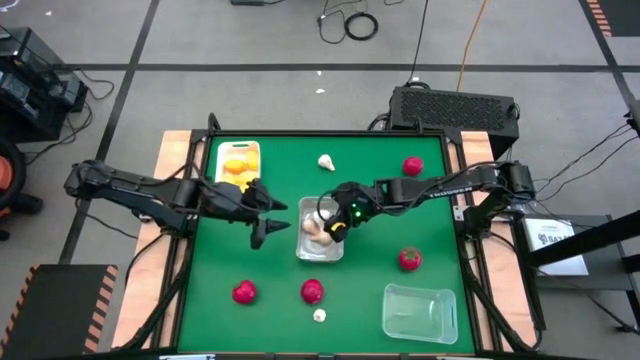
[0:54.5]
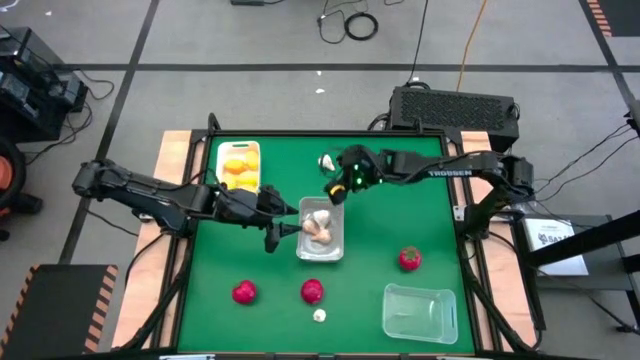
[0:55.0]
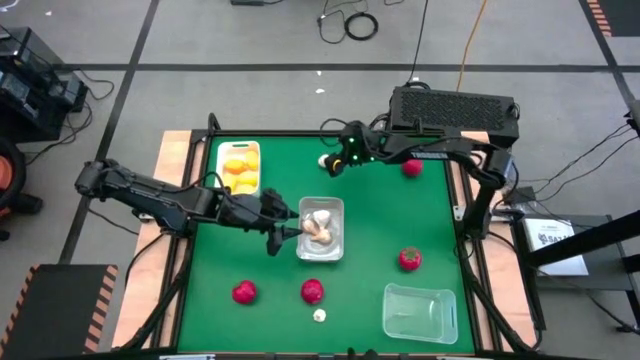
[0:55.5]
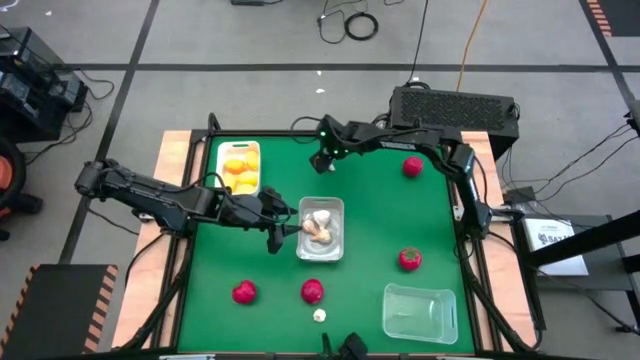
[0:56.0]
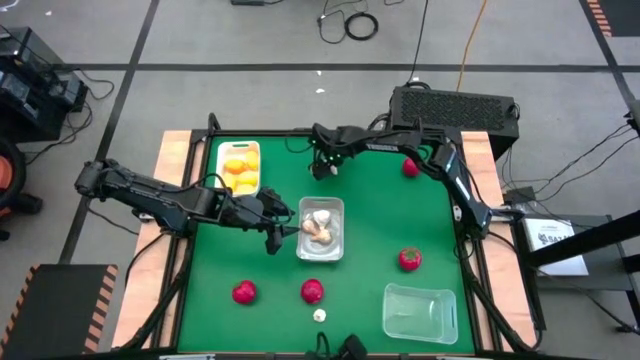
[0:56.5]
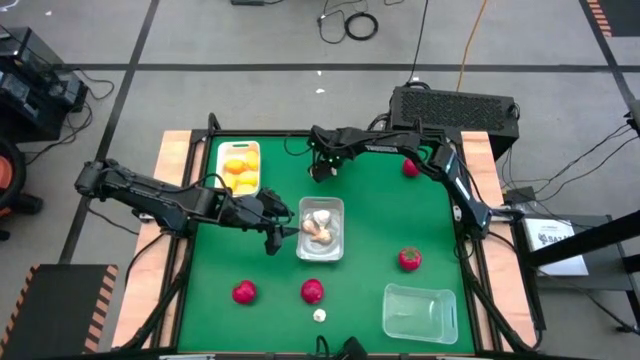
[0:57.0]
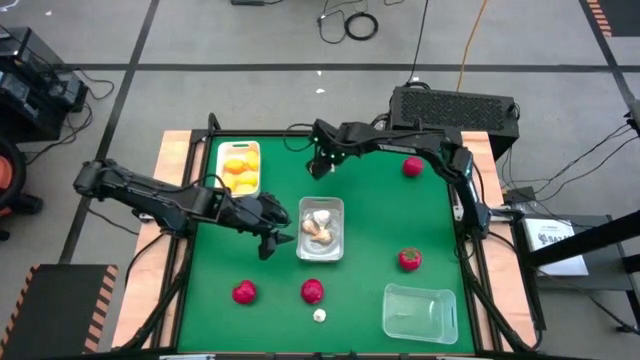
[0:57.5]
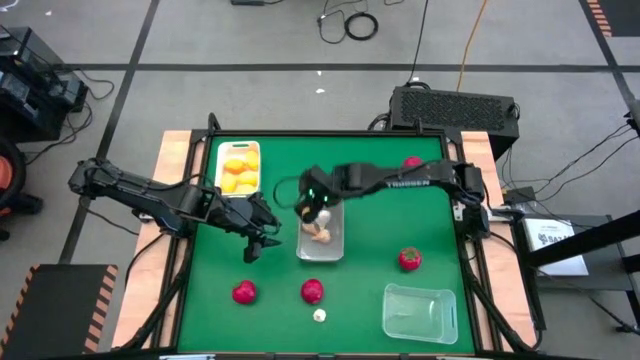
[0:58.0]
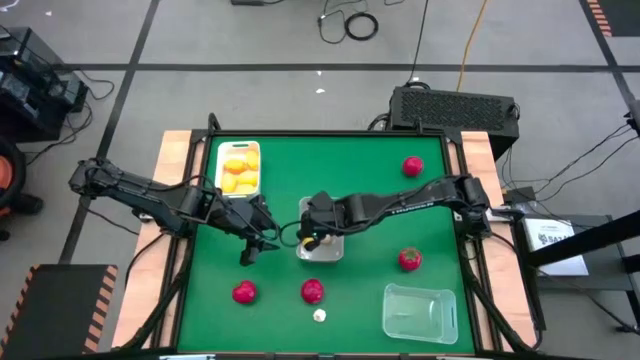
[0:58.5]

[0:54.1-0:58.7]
Task: Sort produce into baskets
Put the garlic into the gray bin

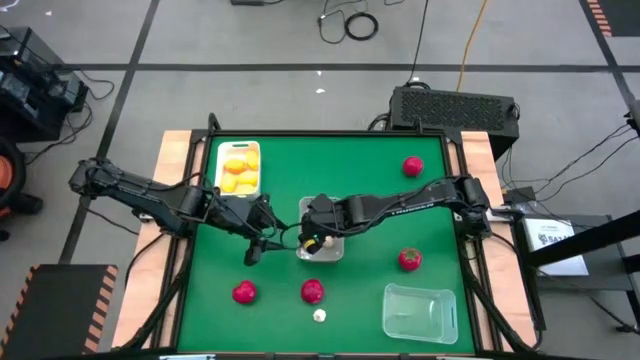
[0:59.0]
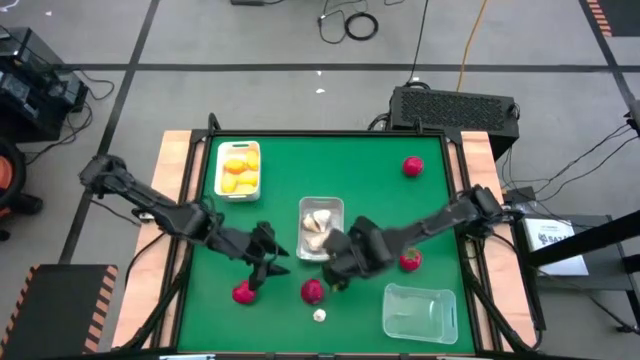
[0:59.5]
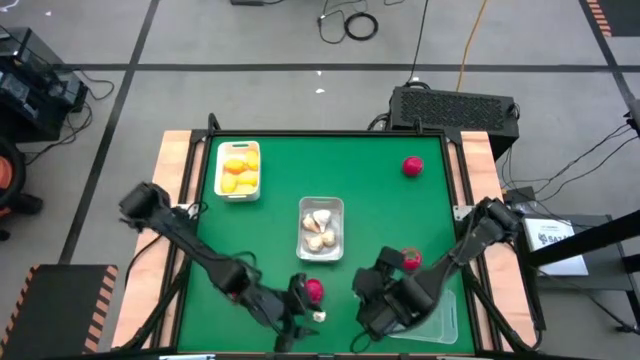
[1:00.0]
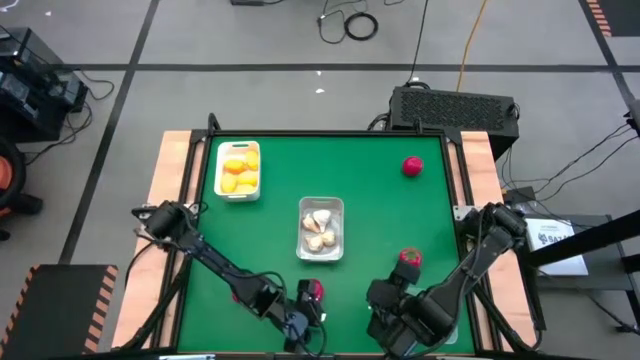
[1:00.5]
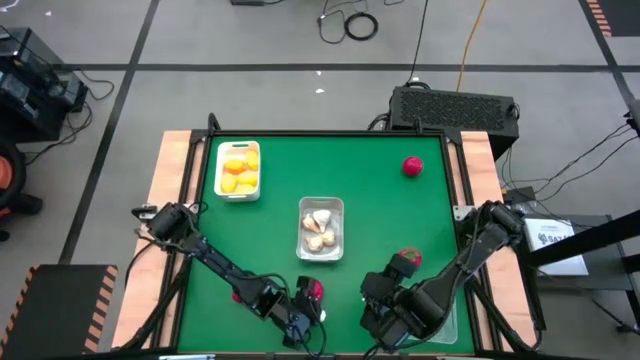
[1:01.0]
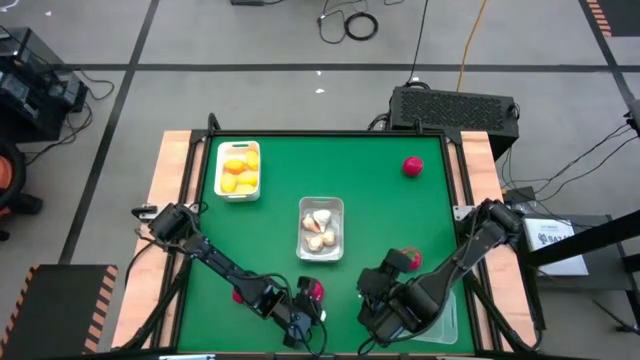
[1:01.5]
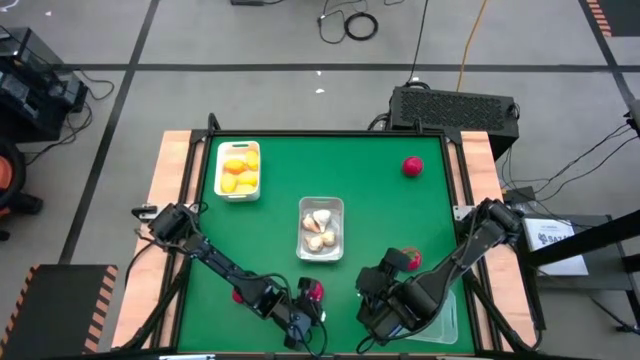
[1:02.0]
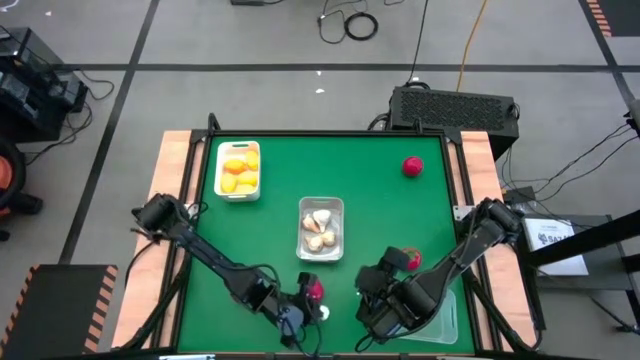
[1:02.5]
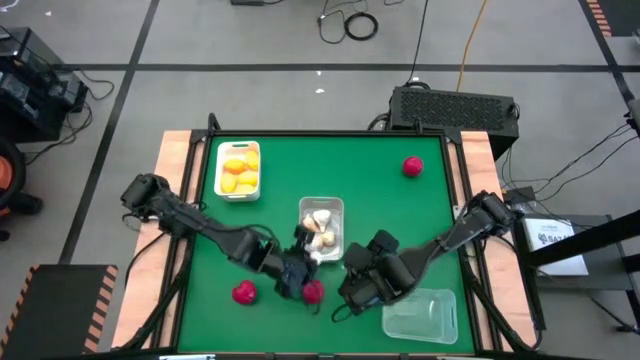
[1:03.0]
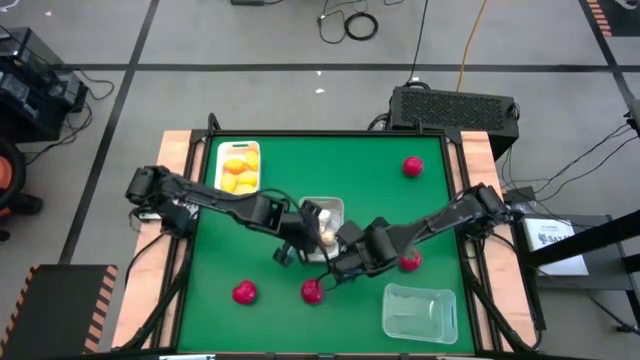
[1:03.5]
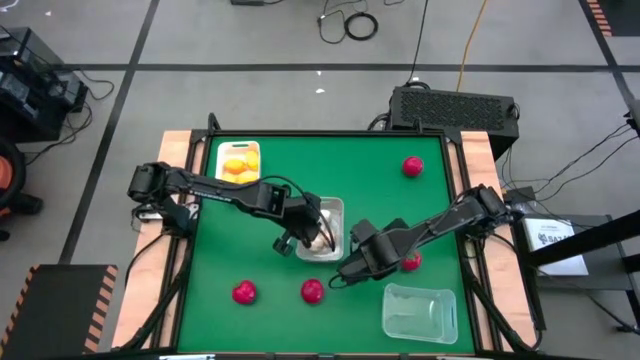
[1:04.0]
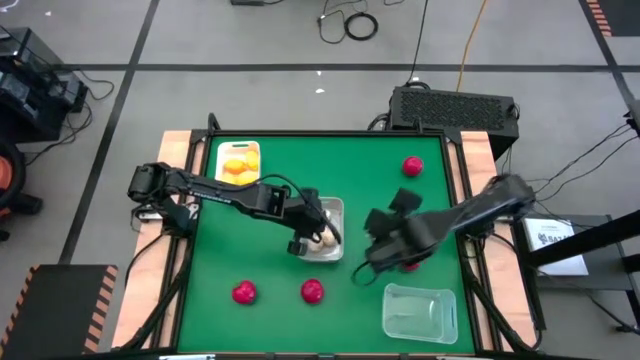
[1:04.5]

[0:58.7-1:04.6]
Put the garlic into the gray bin

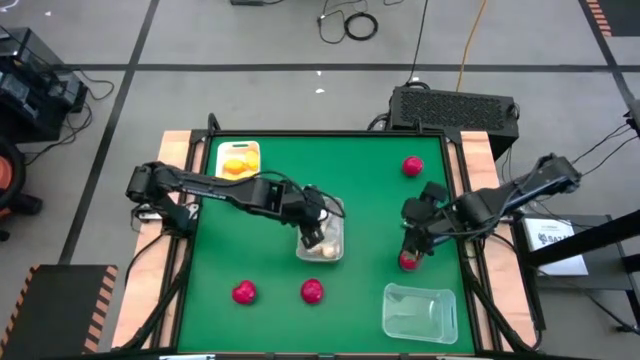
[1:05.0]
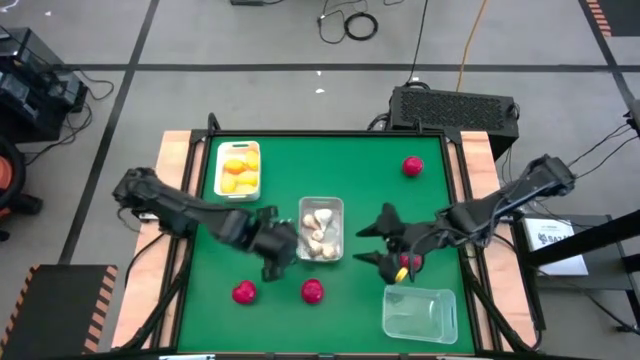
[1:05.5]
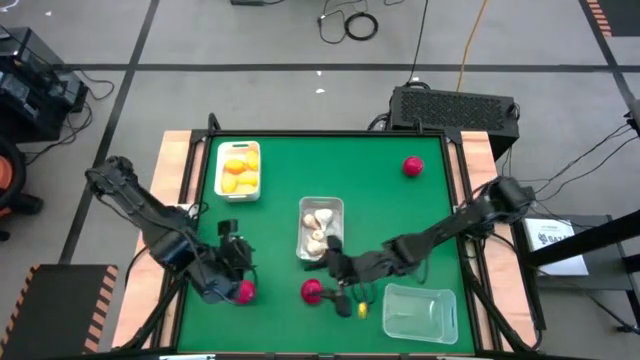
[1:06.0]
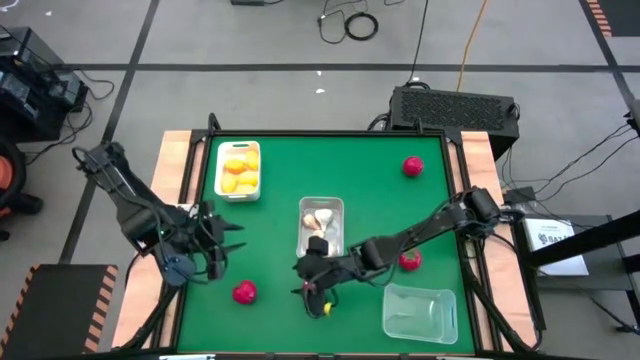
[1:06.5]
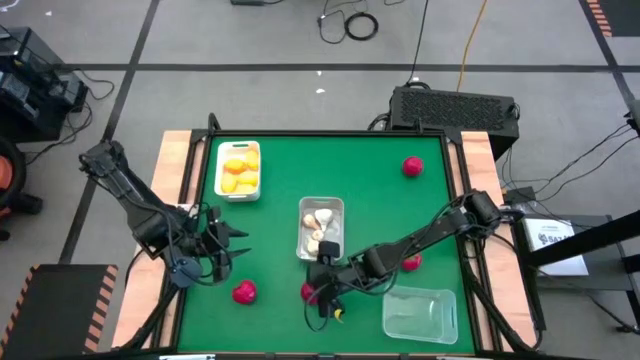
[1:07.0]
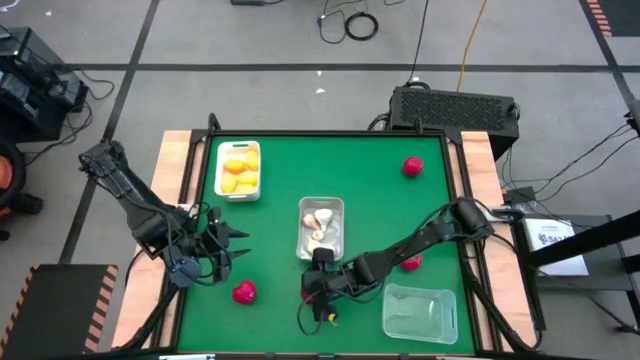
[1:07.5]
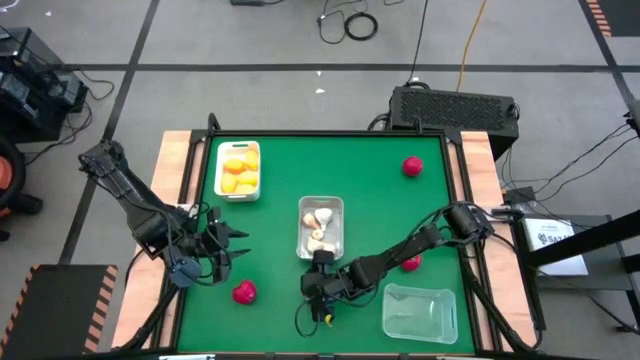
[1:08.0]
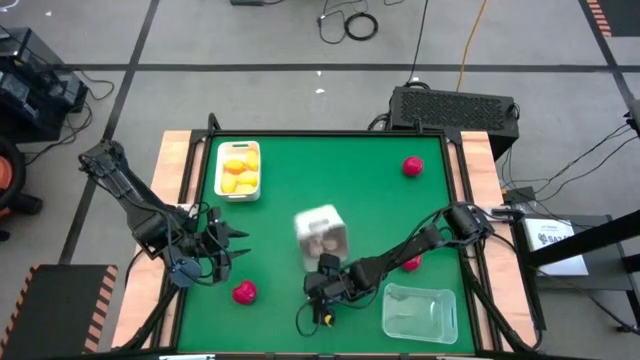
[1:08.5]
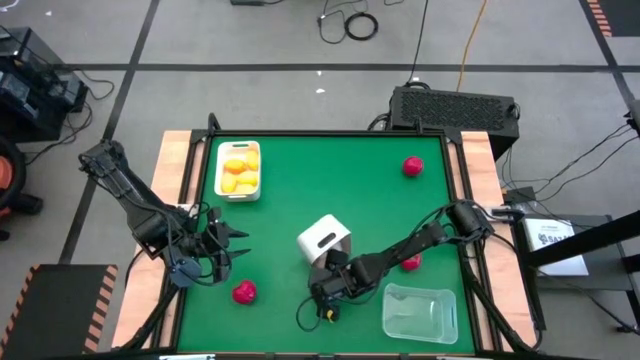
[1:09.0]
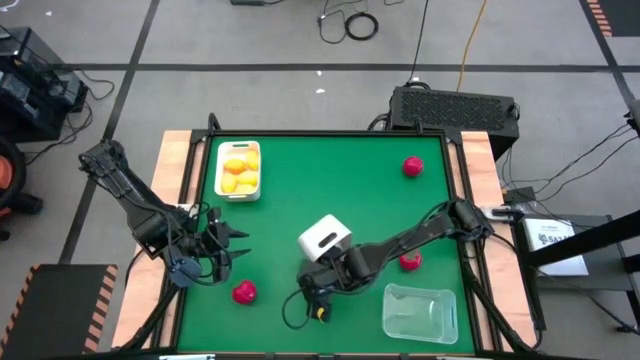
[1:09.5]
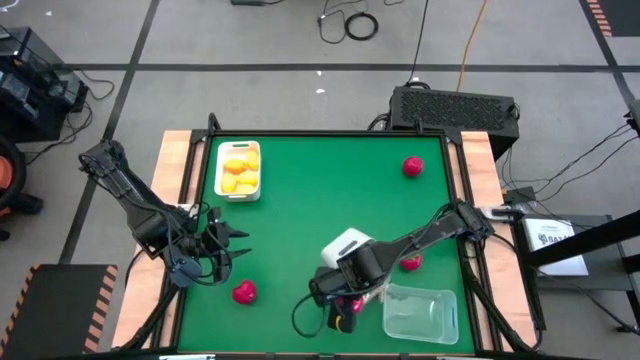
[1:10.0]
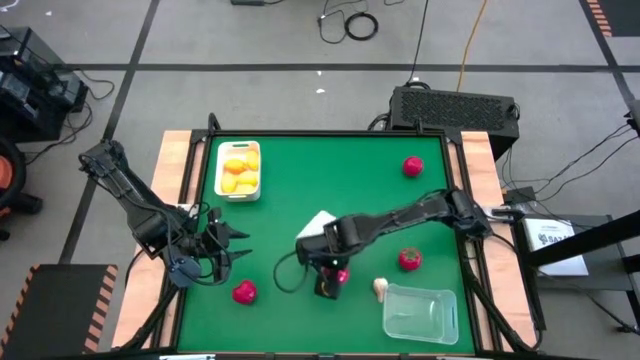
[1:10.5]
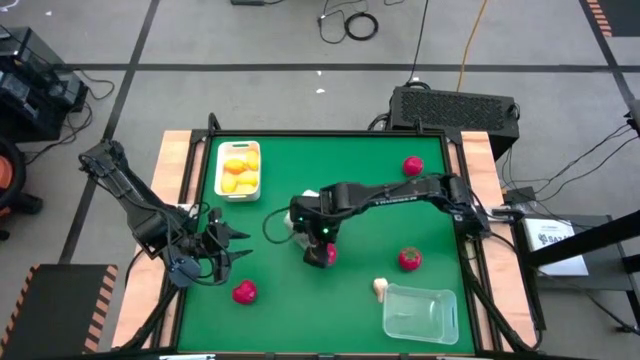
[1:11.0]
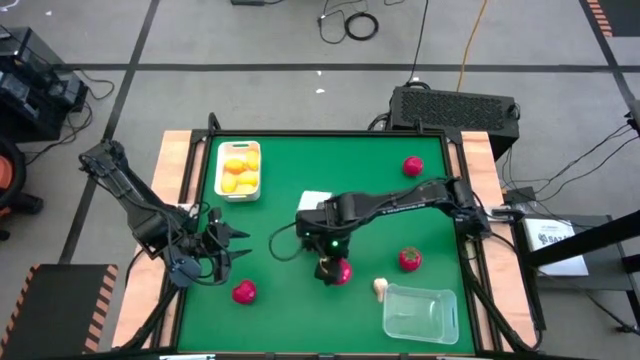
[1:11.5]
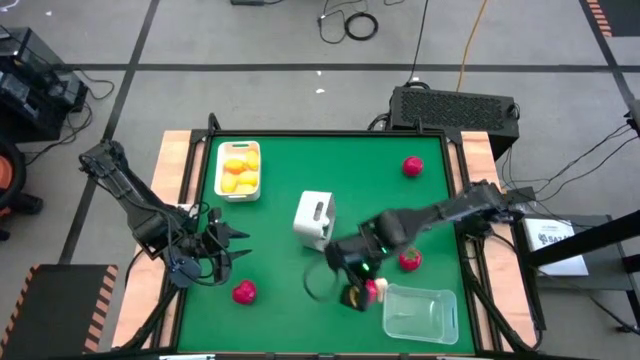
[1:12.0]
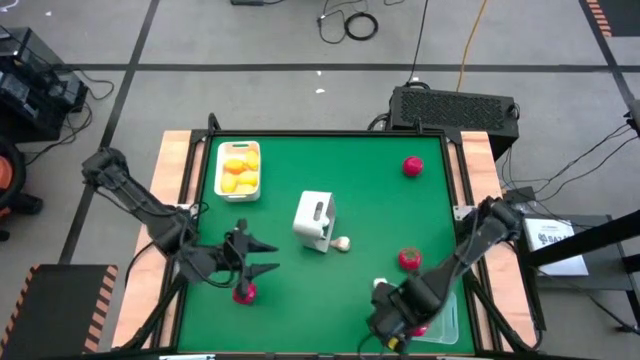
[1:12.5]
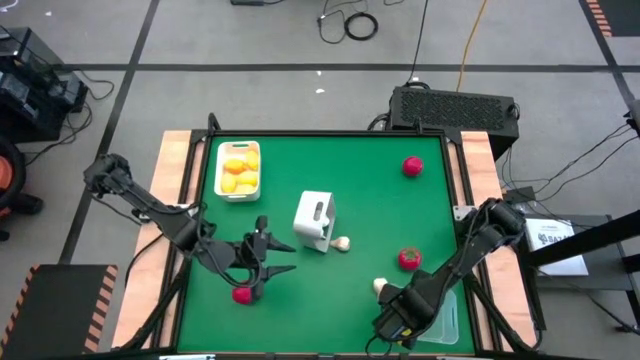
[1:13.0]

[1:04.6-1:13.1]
Put the tomato into the transparent bin

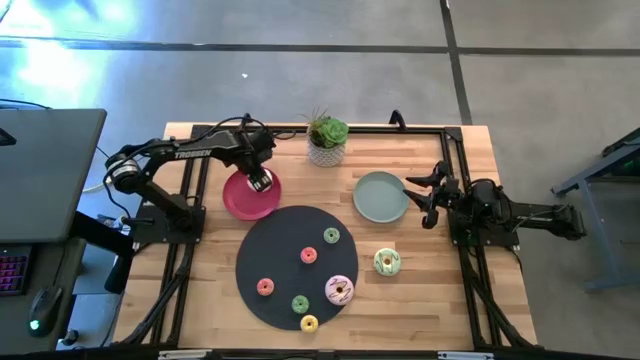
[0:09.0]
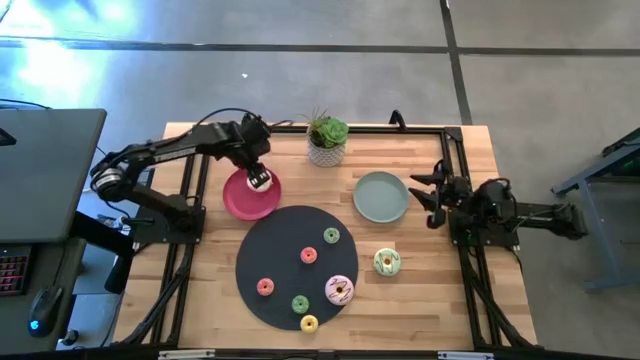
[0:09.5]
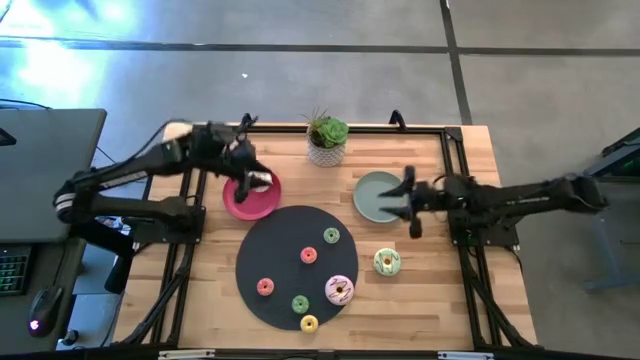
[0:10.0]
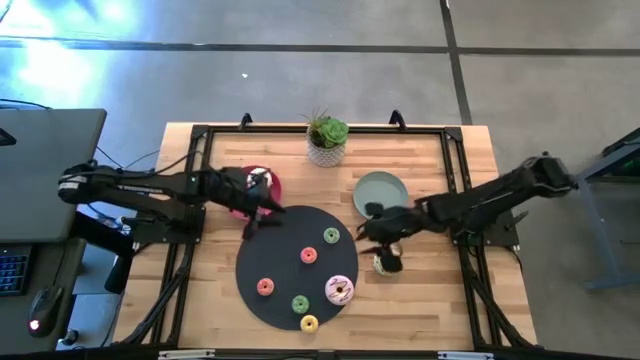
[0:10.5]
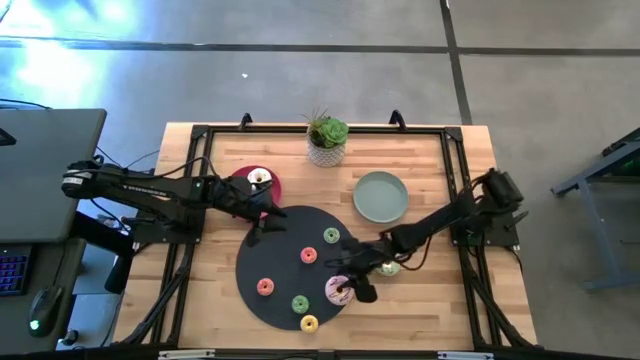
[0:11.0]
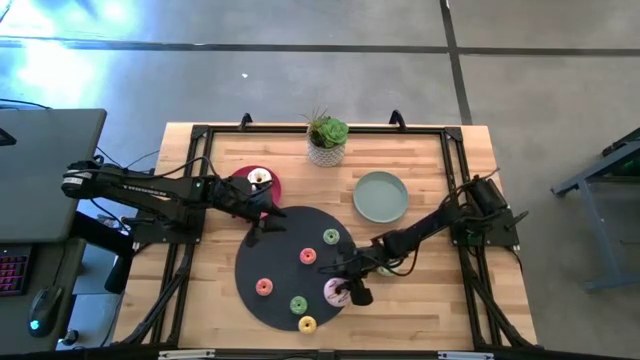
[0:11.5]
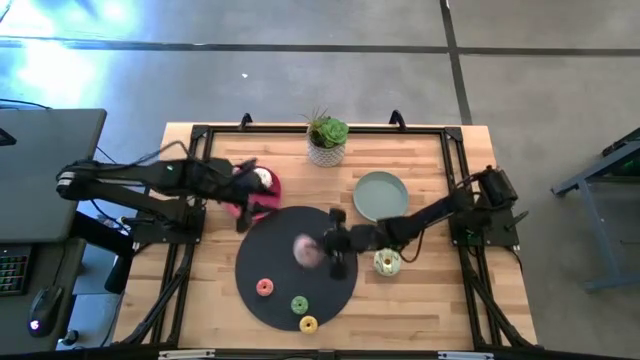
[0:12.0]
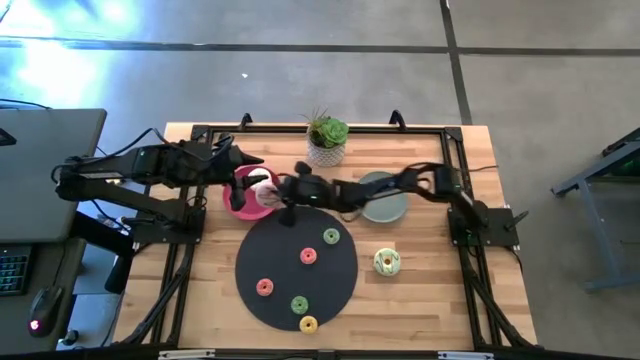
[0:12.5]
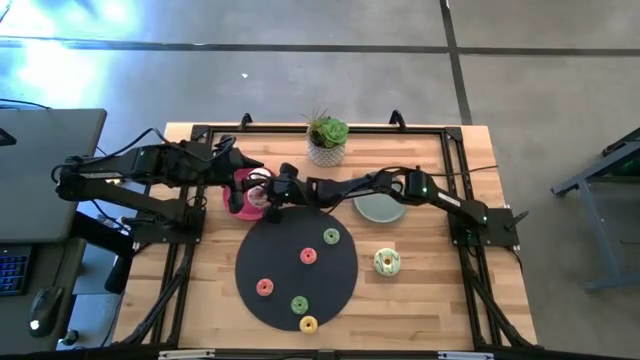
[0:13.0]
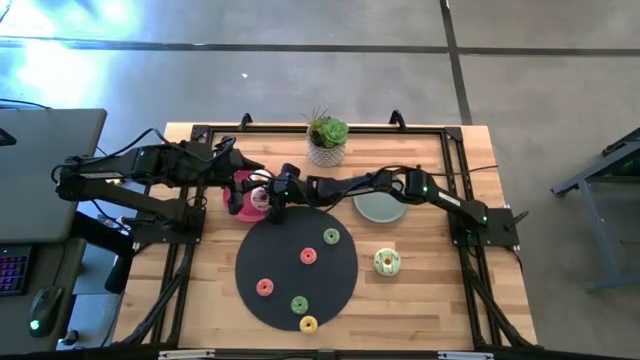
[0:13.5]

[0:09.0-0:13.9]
Task: Pick & Place donuts
Put the big pink donut on the red plate
